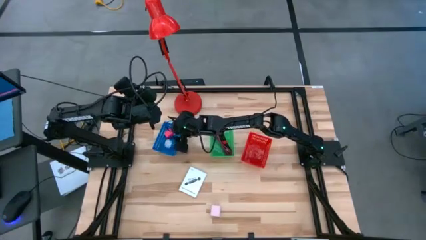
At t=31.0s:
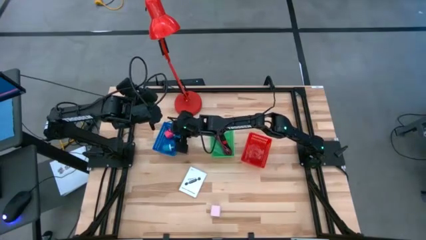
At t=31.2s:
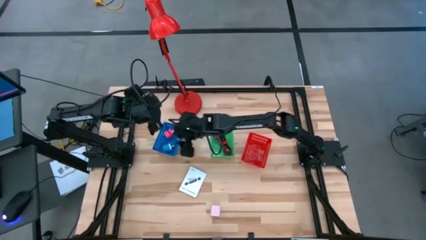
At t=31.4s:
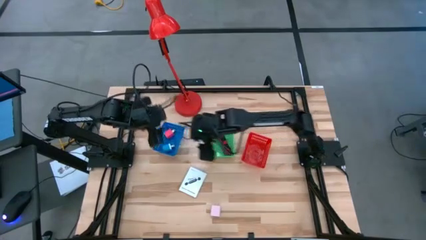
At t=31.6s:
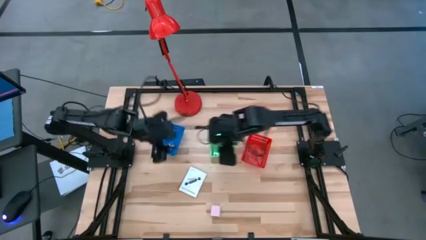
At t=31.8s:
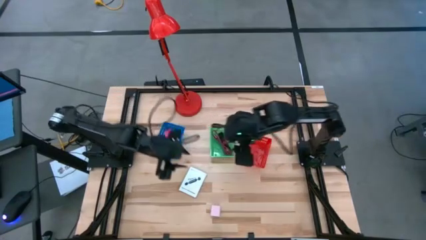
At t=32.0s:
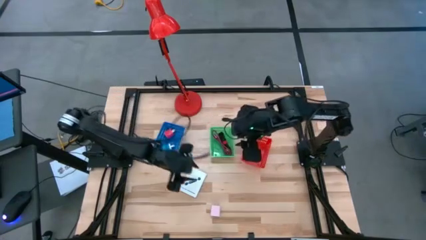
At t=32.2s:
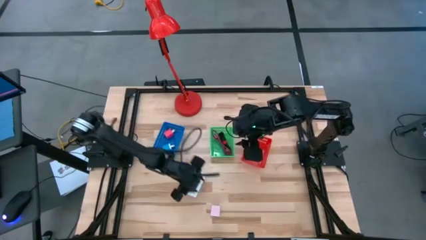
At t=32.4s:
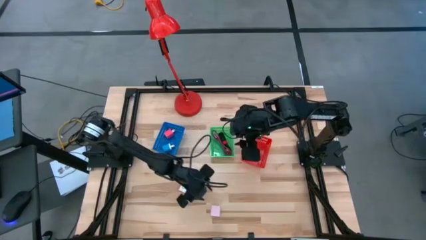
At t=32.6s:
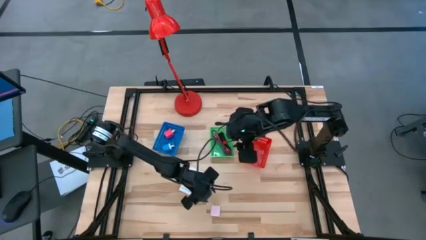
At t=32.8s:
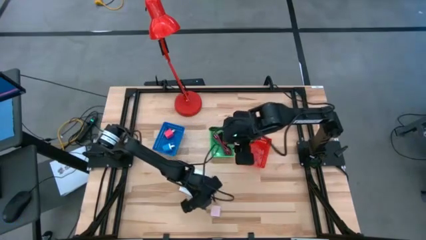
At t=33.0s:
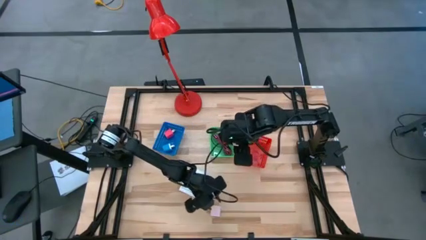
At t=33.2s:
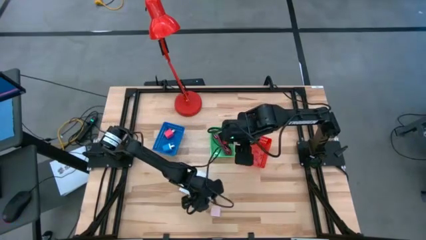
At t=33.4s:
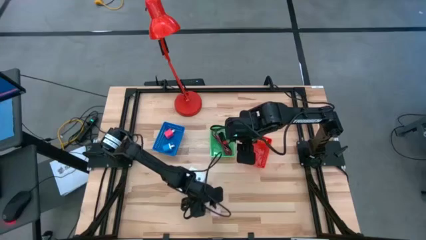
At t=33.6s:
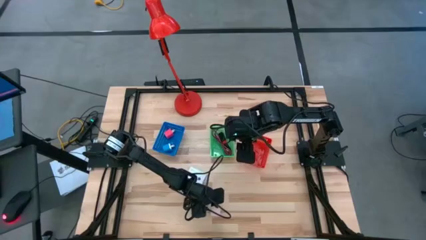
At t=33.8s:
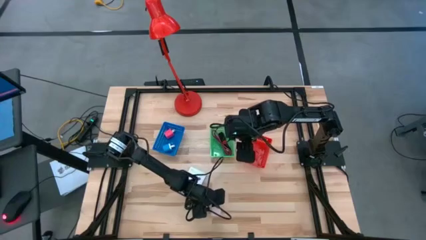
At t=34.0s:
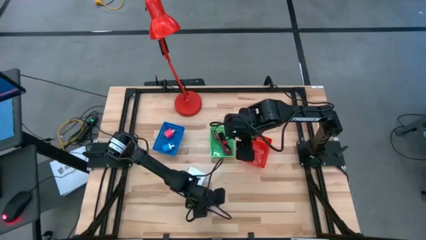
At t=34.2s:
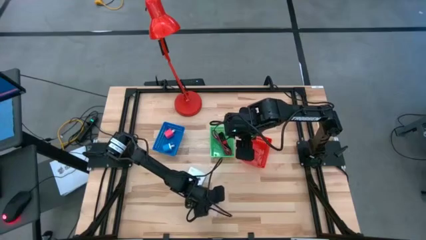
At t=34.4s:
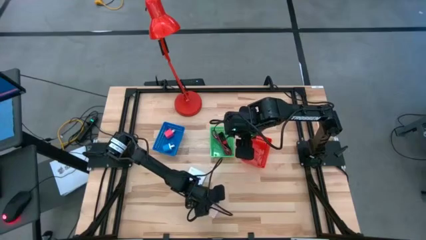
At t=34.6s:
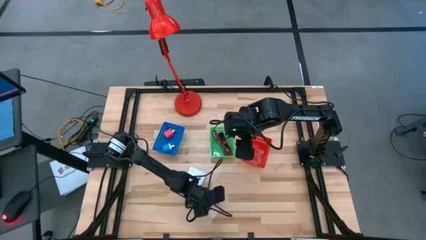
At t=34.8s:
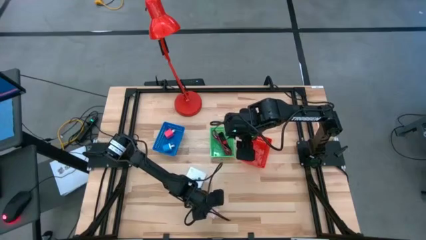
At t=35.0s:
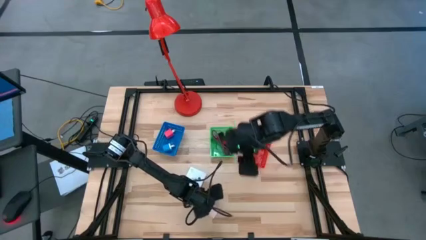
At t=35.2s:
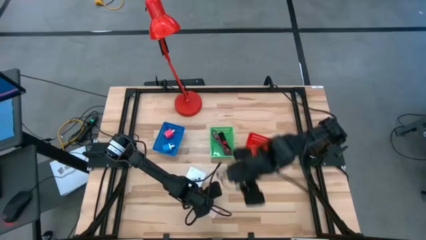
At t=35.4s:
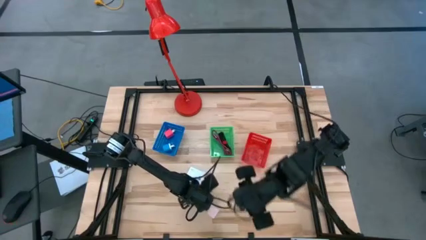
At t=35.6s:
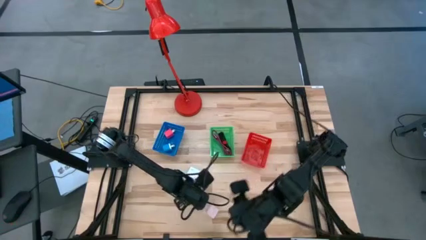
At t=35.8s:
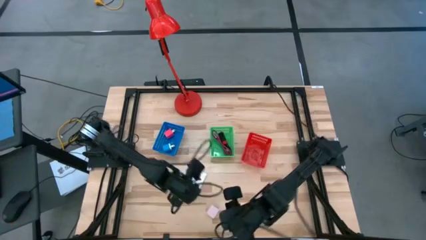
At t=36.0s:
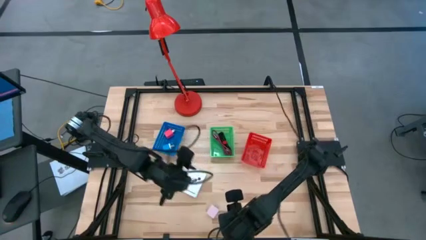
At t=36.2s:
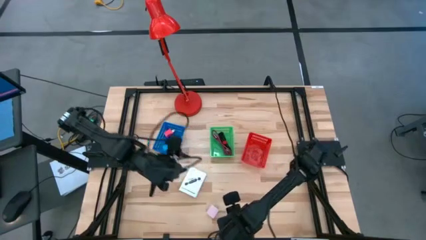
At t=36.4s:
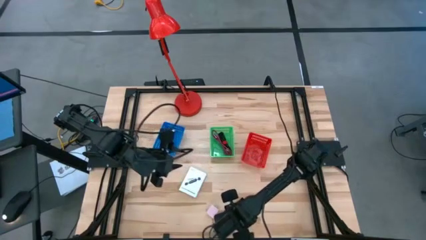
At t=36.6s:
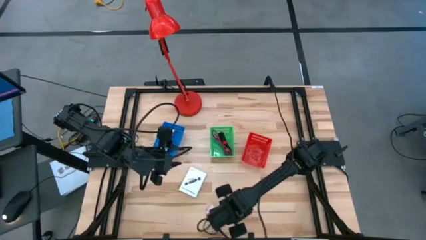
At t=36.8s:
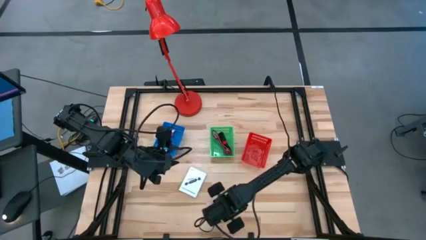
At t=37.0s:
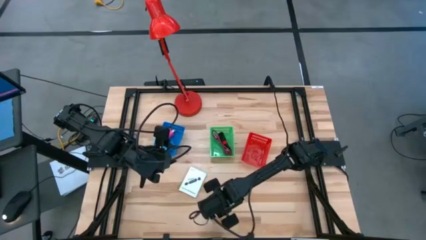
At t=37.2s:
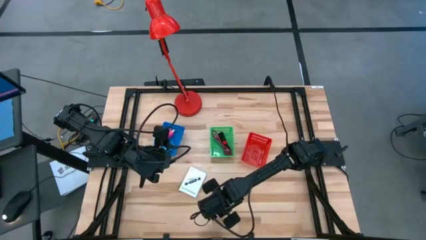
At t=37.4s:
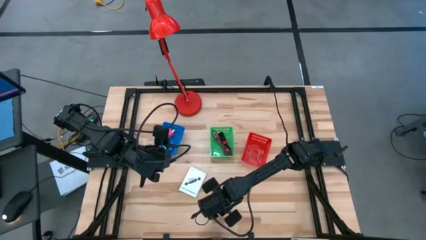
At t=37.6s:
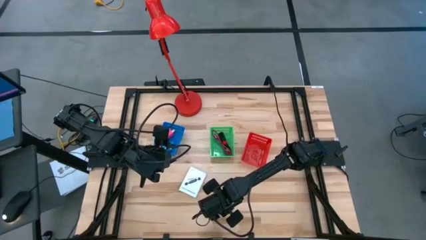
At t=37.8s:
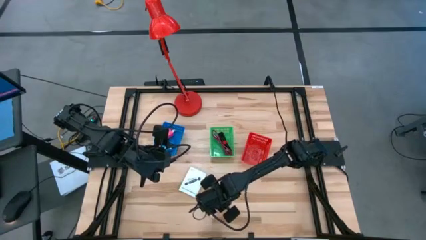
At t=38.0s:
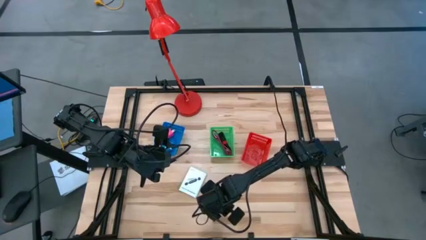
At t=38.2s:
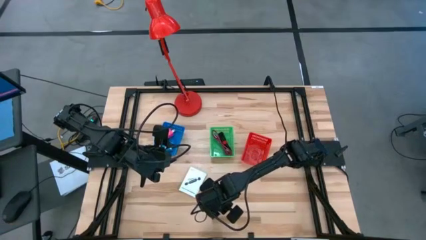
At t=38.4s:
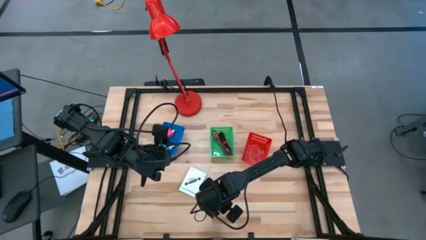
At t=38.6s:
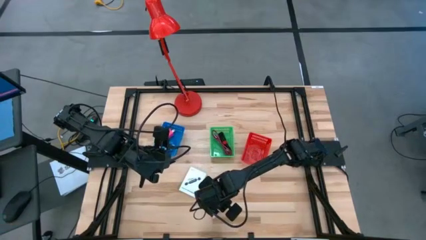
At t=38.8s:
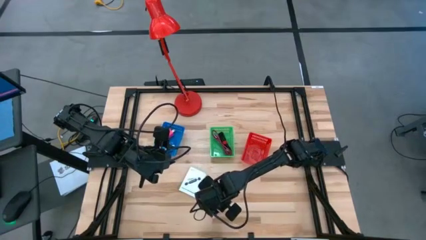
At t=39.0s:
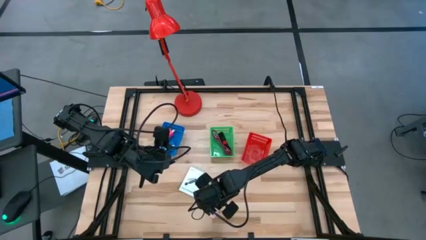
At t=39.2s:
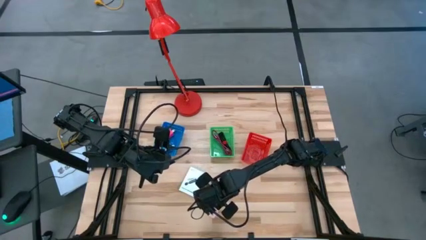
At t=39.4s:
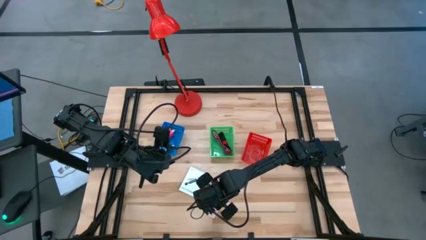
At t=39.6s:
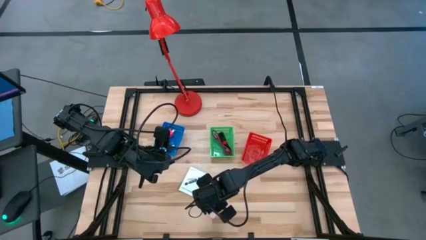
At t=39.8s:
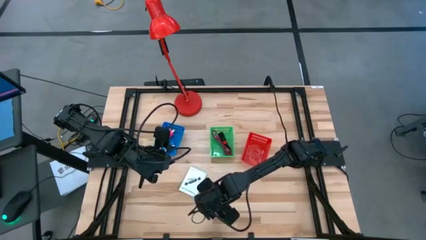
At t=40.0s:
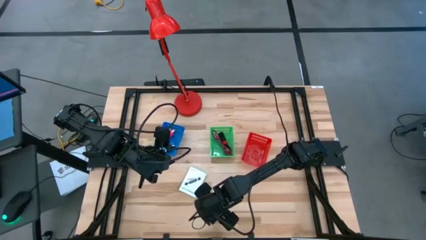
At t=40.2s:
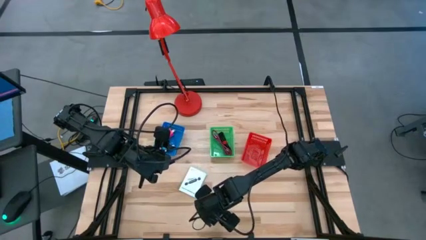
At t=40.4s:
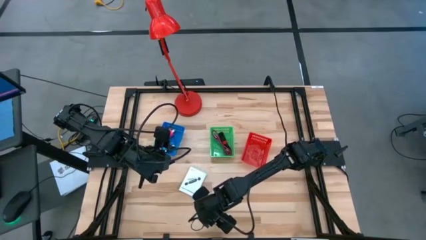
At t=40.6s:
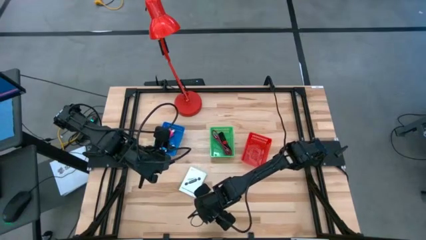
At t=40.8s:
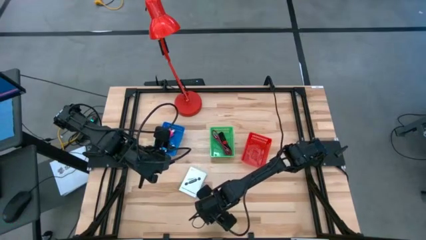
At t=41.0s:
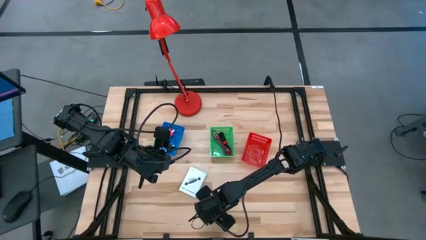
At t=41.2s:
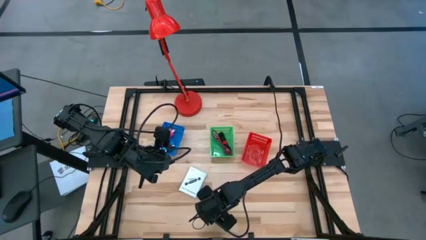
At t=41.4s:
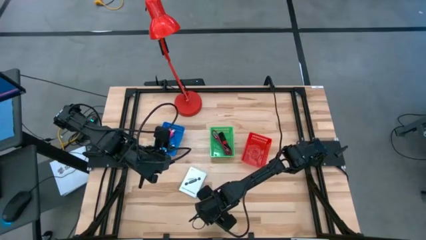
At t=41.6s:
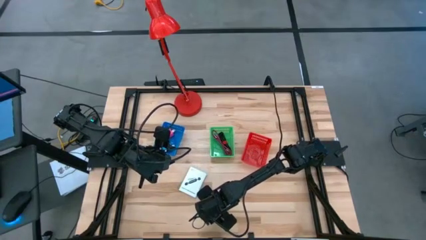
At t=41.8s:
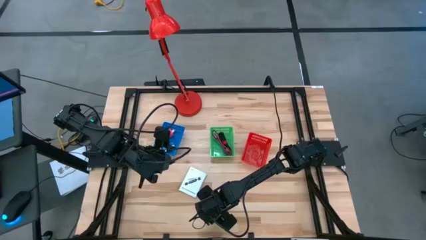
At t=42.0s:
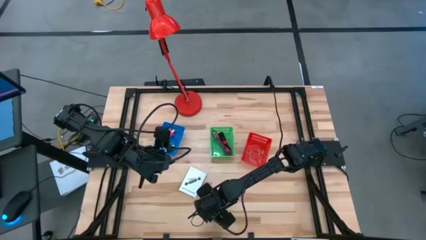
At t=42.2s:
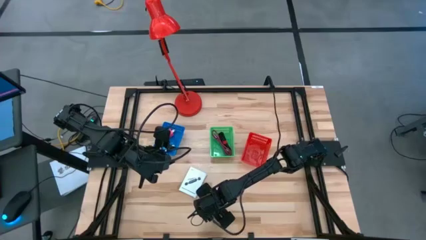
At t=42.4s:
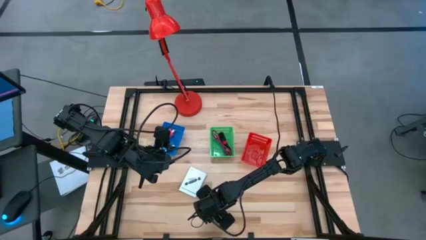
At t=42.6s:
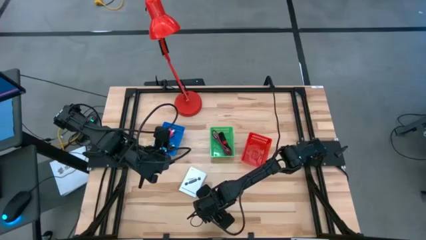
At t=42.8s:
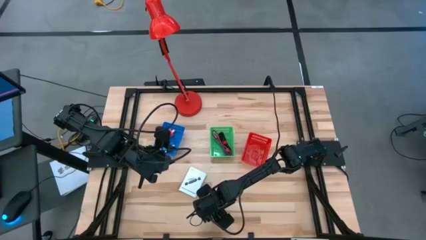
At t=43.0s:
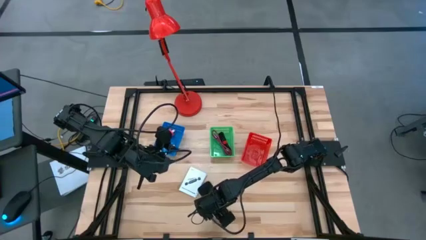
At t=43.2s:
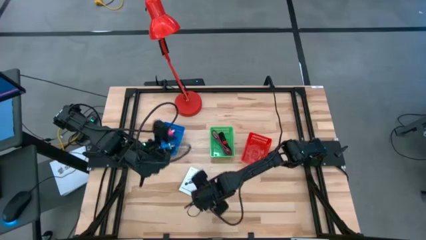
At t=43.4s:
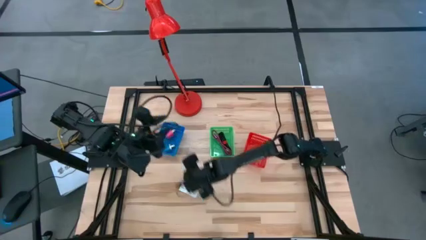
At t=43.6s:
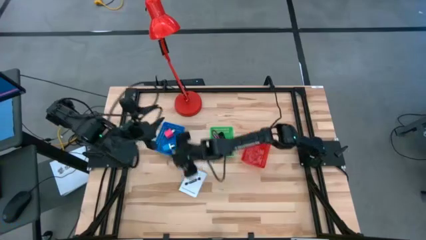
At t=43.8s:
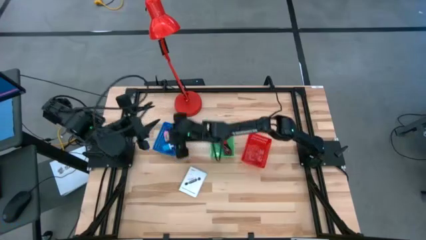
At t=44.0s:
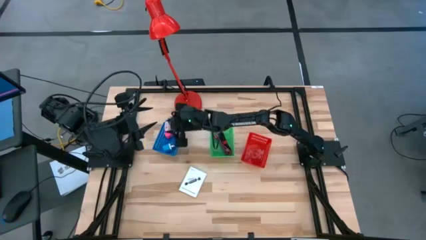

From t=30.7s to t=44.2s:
Task: Pick and place items into bin
Put the light pink charger adapter into the blue bin
